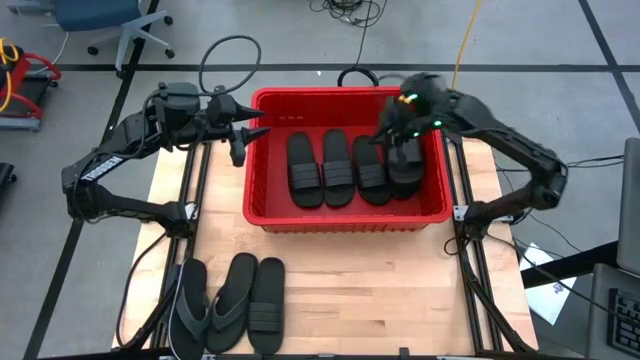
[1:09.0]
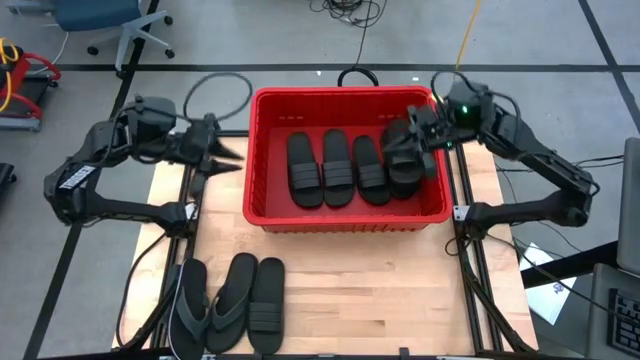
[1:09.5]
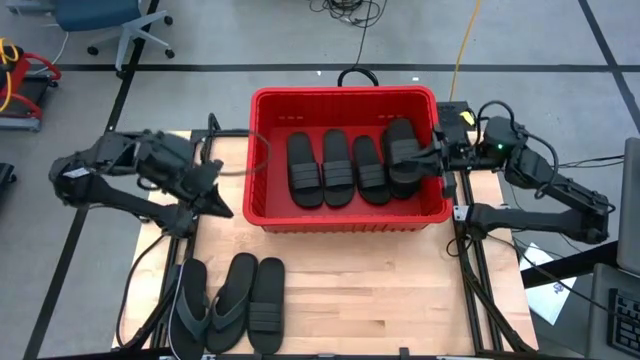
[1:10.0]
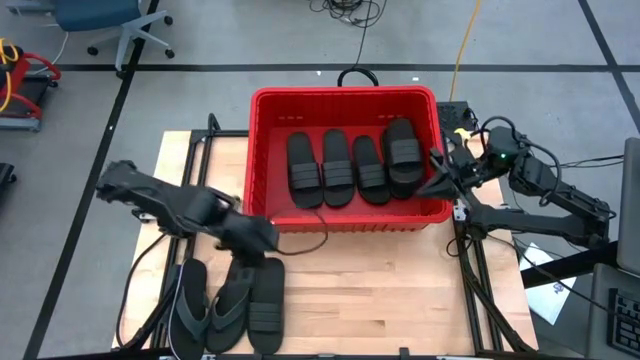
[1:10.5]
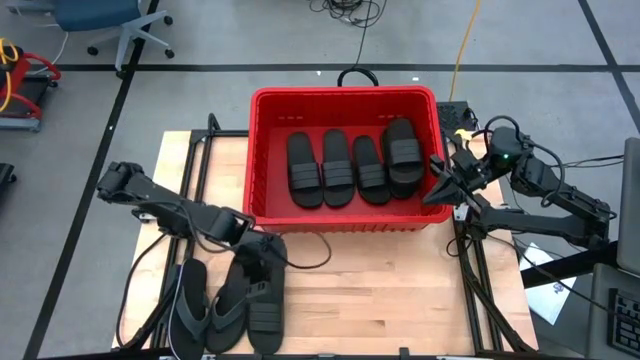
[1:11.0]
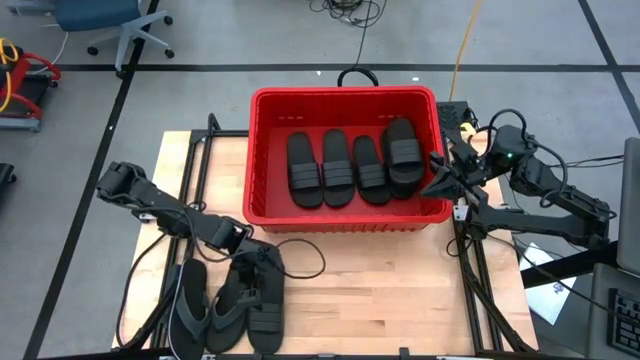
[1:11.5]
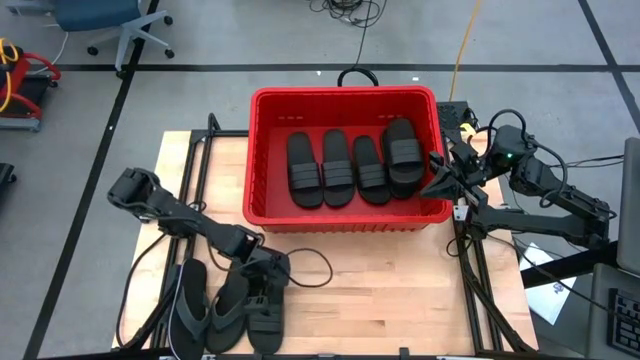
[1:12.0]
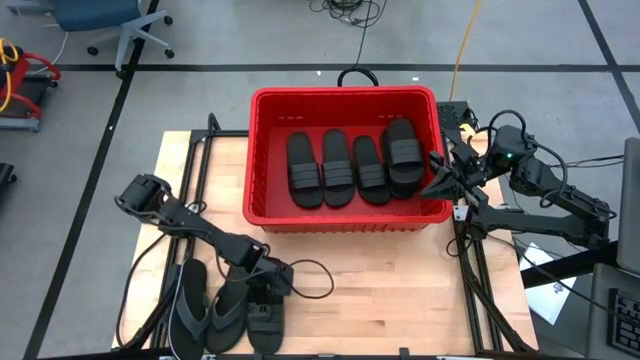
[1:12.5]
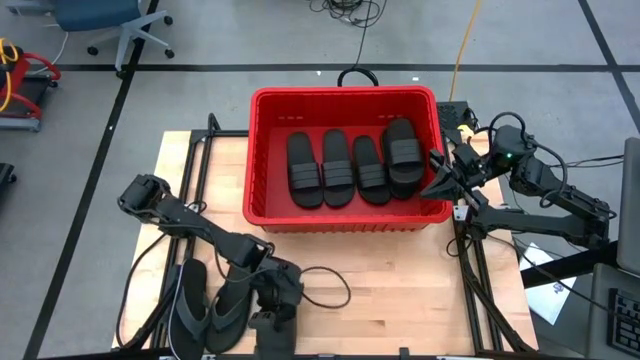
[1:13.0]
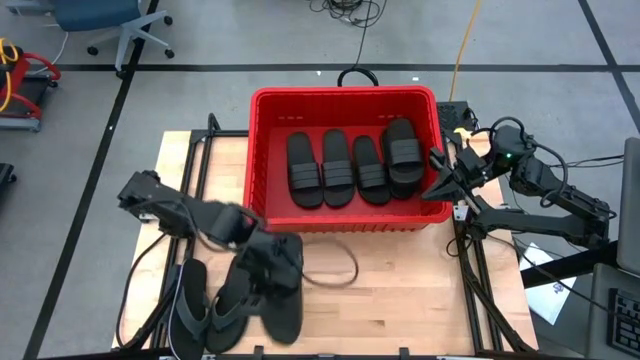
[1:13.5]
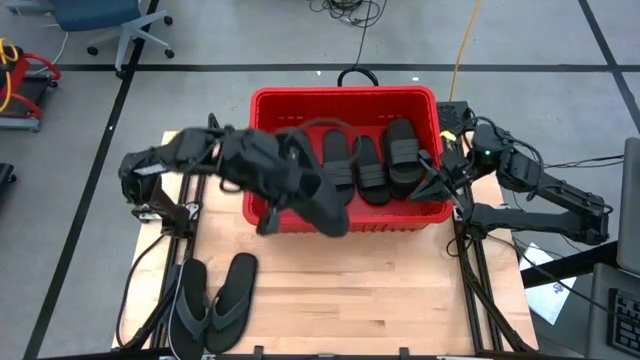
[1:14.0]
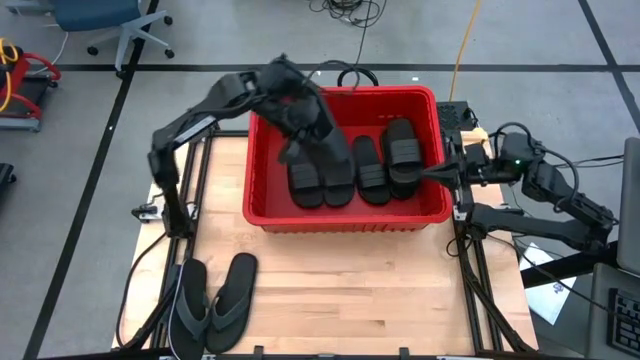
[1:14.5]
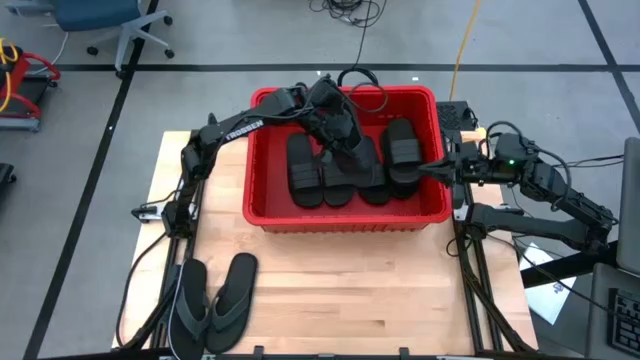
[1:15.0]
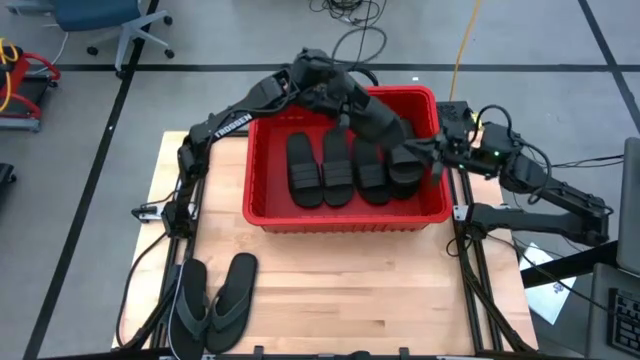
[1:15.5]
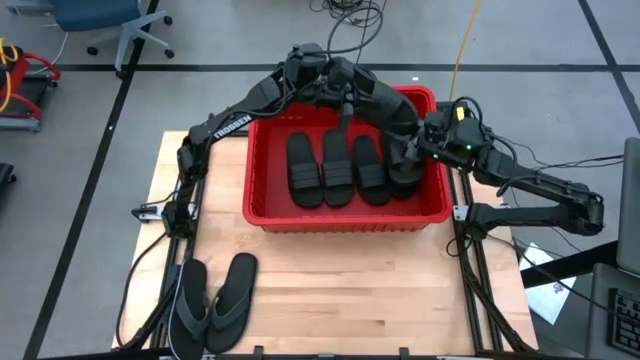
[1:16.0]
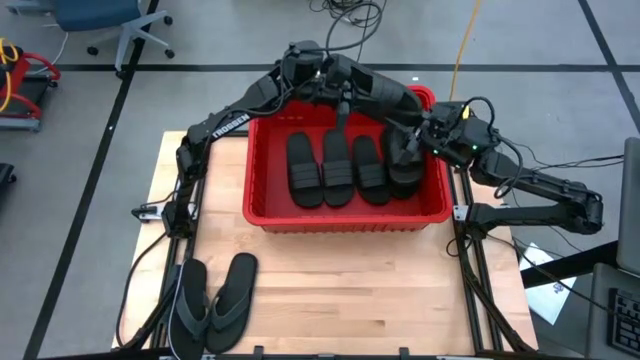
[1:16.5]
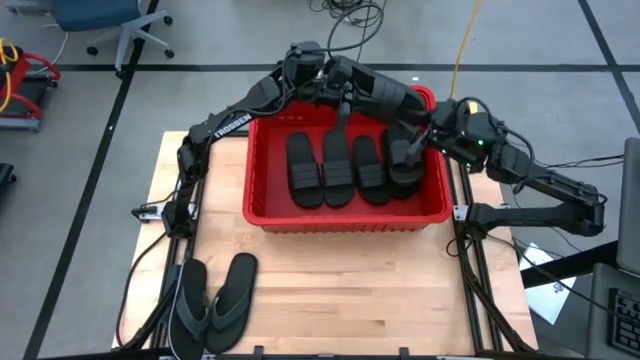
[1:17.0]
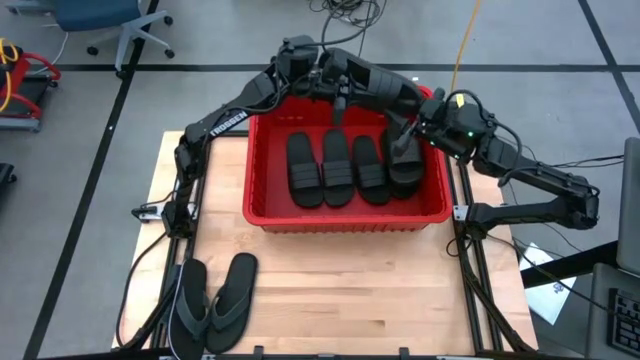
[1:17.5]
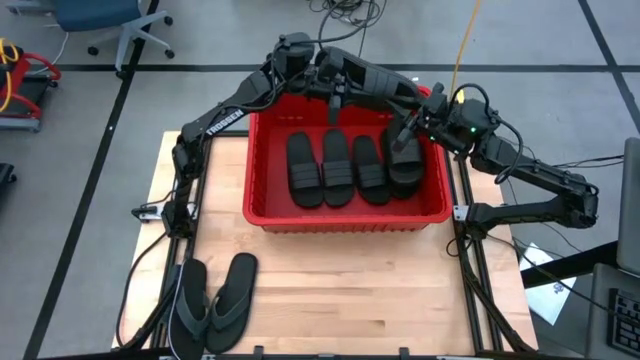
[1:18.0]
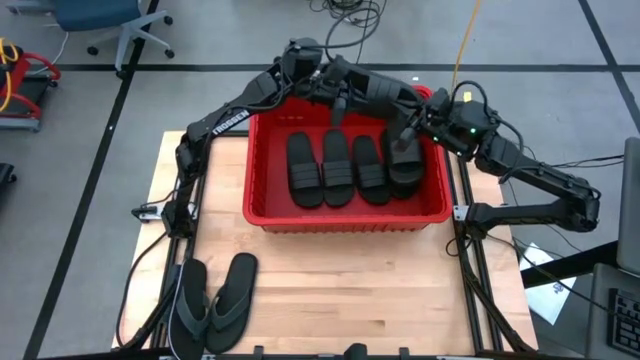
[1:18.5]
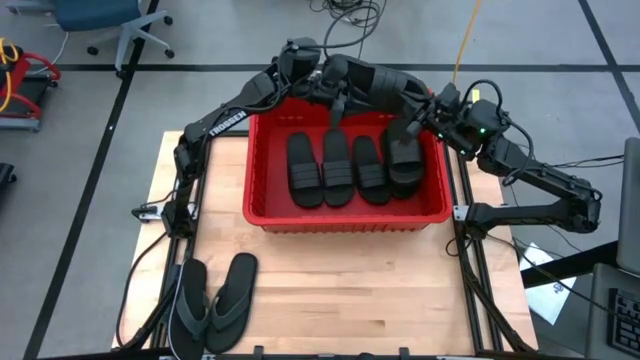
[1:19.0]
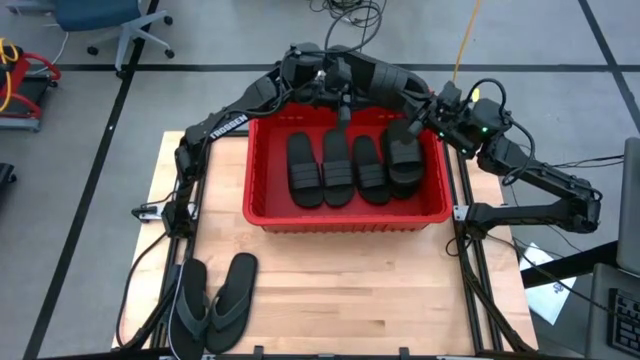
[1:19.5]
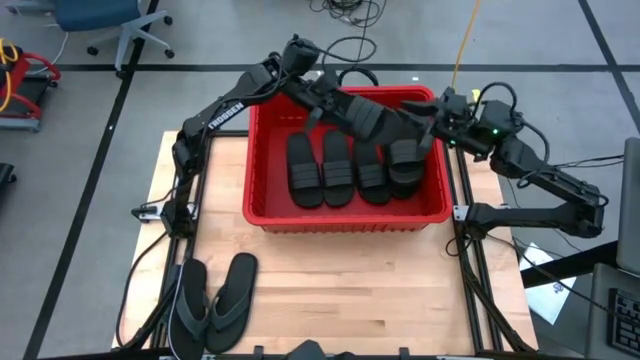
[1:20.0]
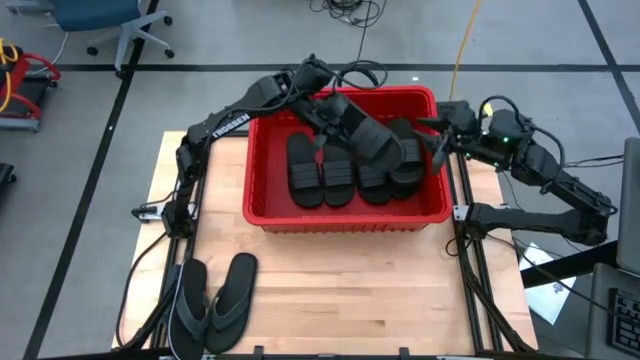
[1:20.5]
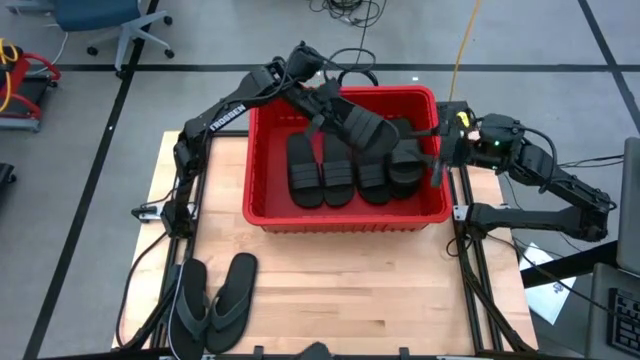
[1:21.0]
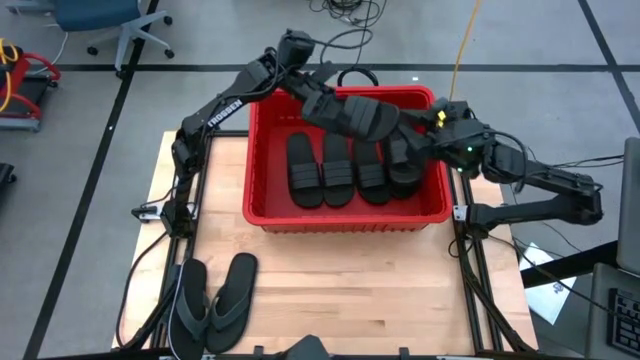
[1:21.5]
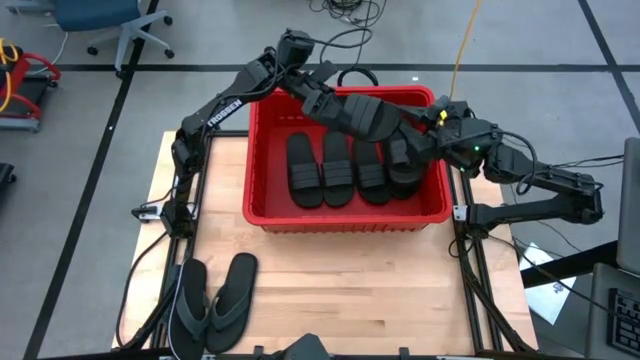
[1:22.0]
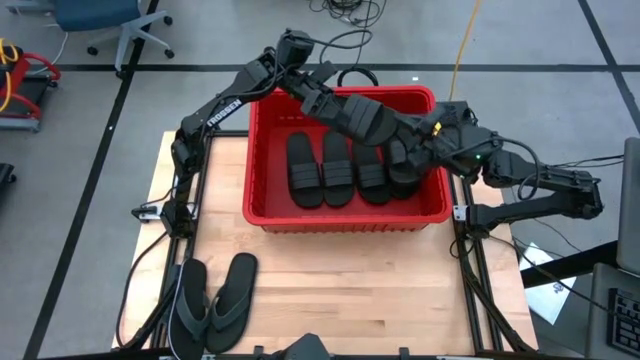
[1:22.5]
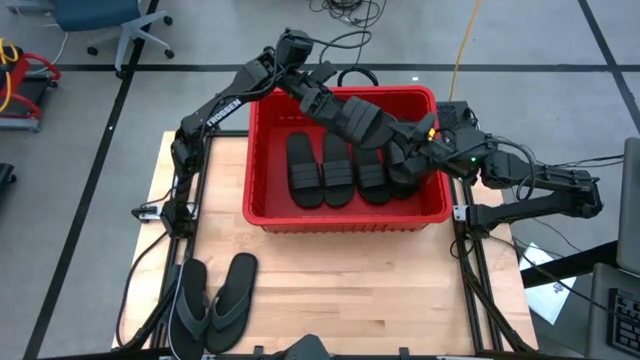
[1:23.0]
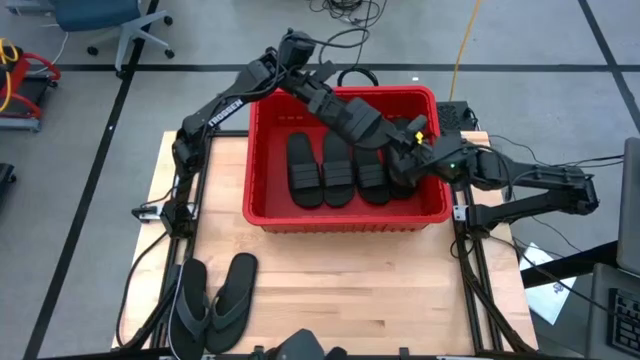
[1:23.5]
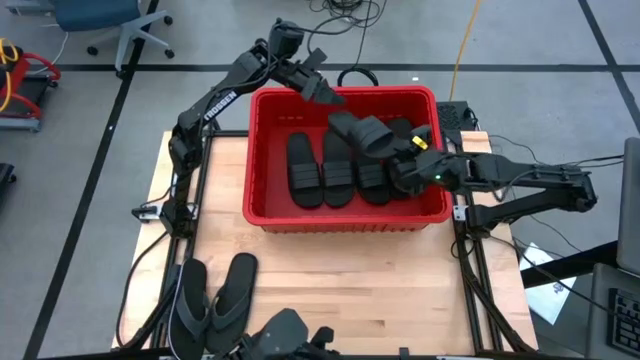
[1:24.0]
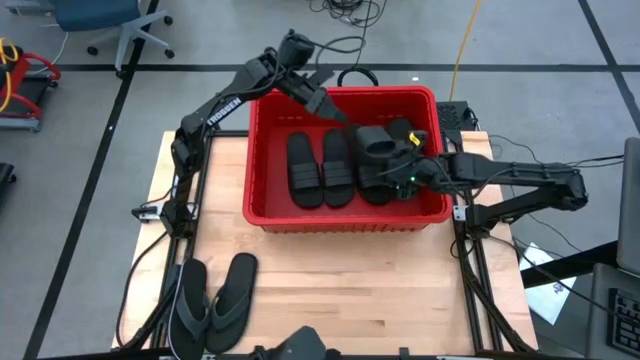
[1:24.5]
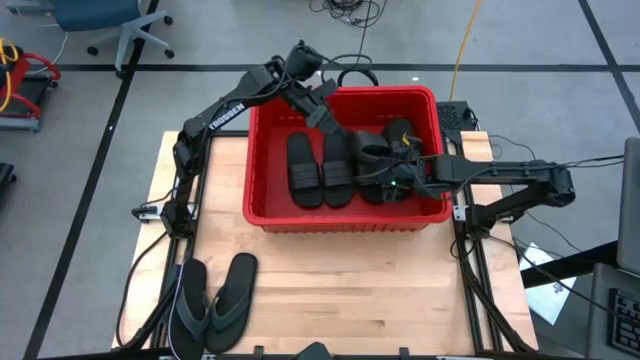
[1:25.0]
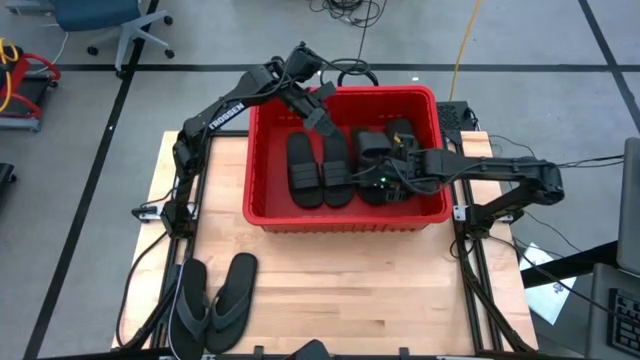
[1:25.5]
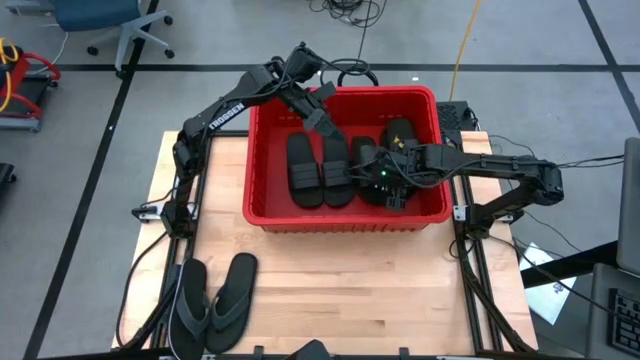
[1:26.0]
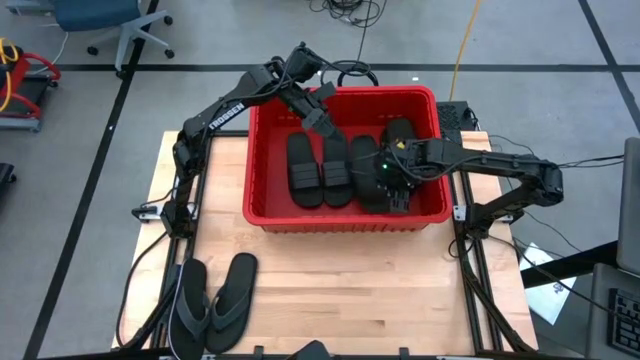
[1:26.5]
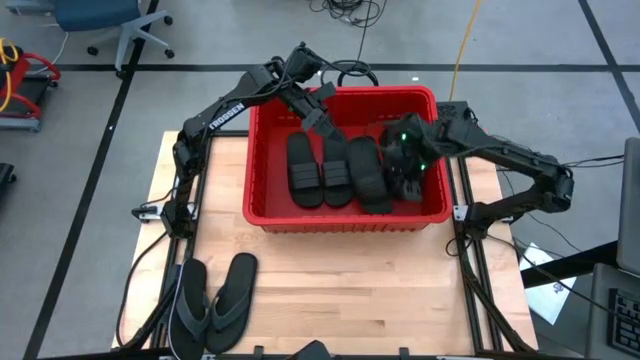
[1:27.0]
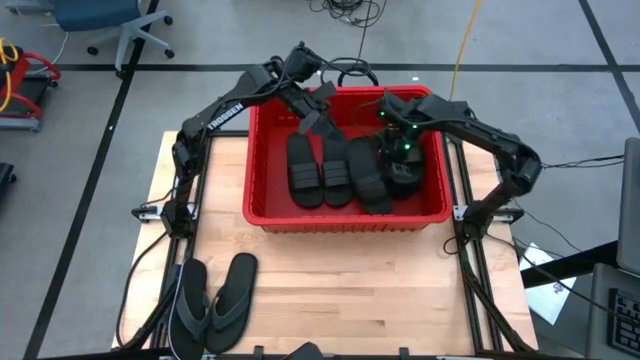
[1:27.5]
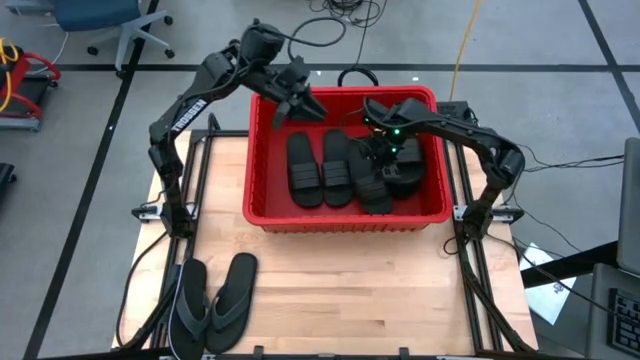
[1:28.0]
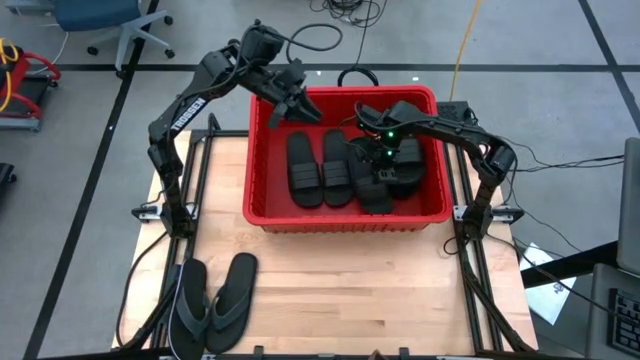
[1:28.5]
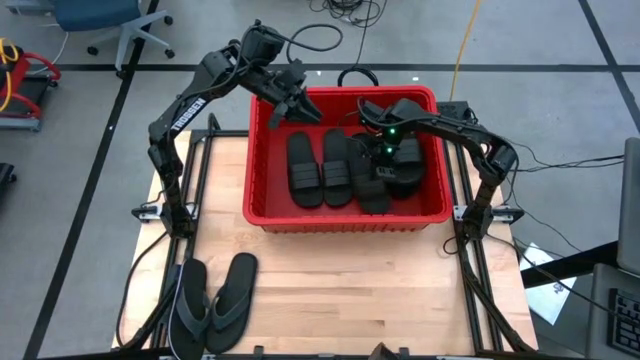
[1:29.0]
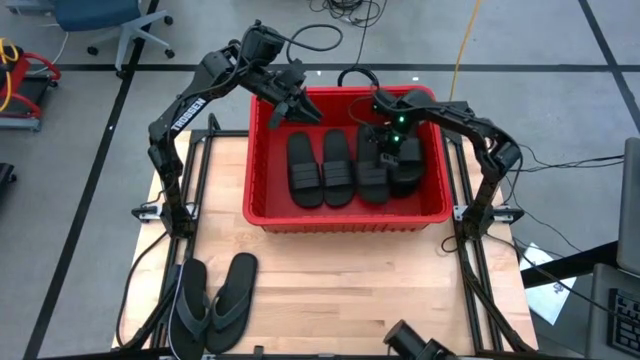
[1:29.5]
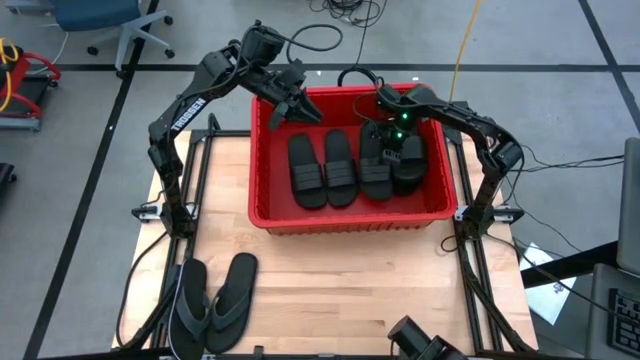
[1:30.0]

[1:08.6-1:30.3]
Task: Pick and place slides into bin
Put the black slide into the red bin
